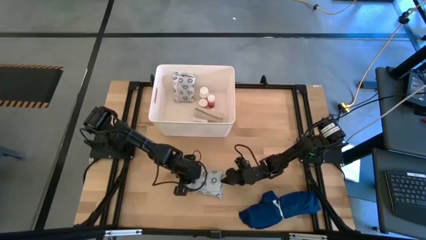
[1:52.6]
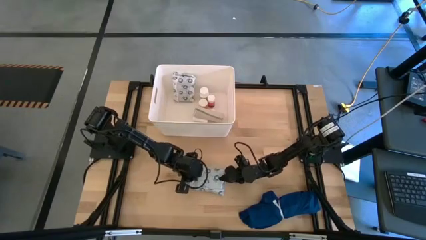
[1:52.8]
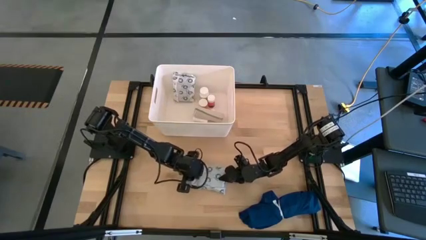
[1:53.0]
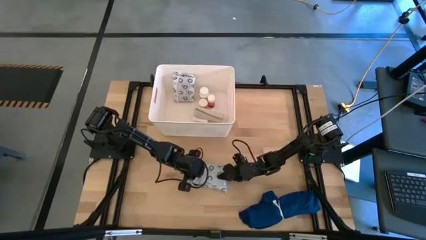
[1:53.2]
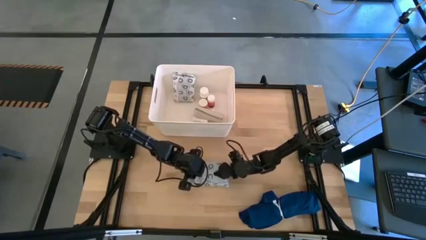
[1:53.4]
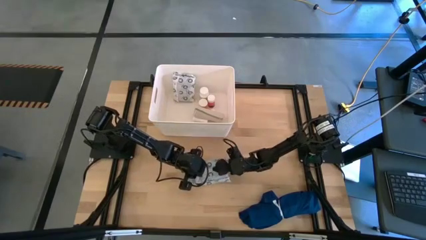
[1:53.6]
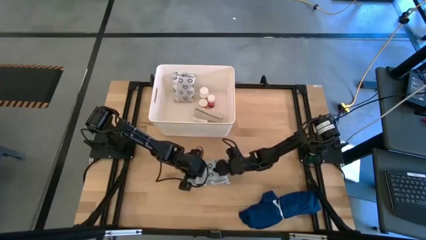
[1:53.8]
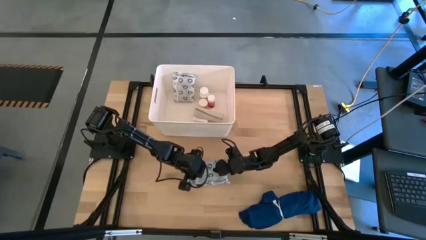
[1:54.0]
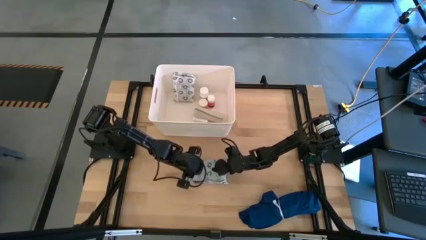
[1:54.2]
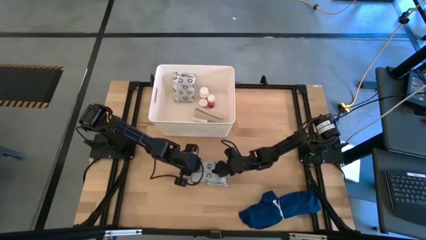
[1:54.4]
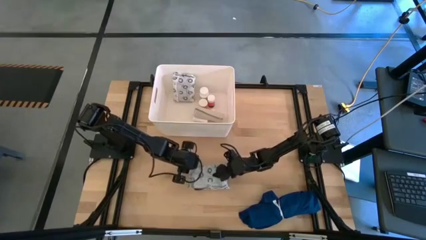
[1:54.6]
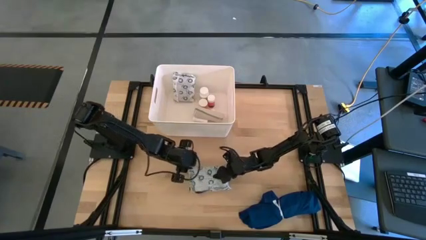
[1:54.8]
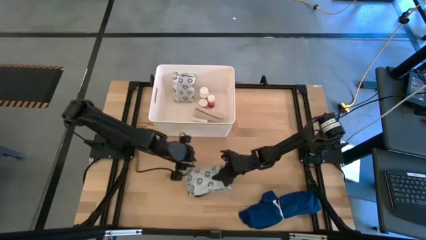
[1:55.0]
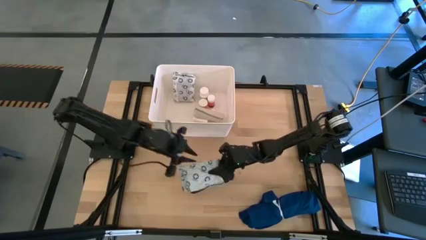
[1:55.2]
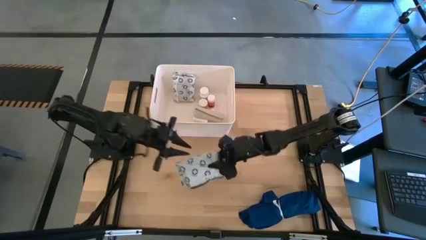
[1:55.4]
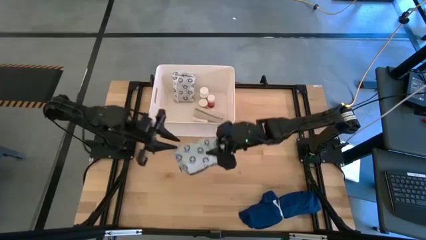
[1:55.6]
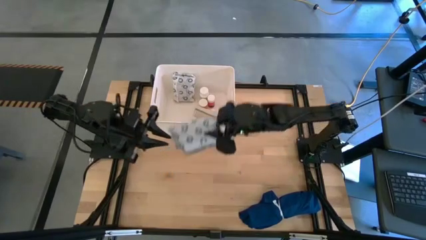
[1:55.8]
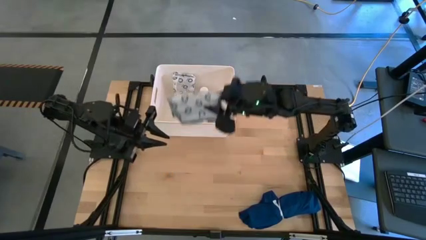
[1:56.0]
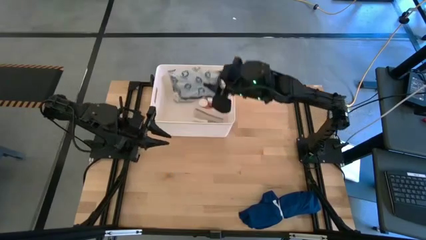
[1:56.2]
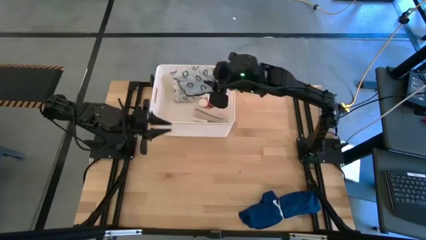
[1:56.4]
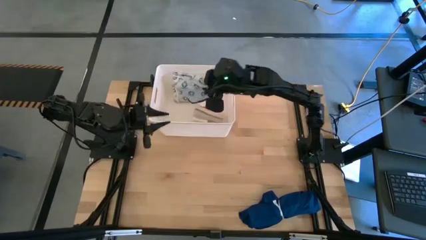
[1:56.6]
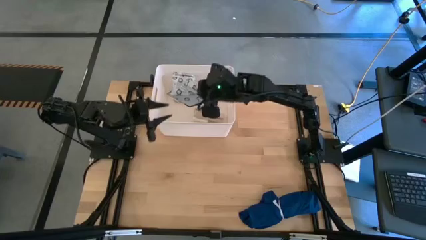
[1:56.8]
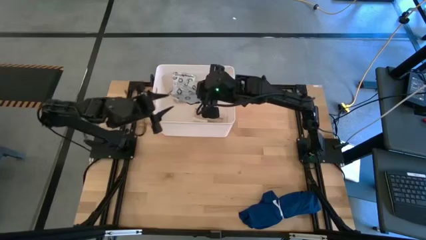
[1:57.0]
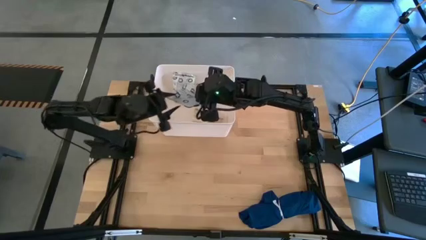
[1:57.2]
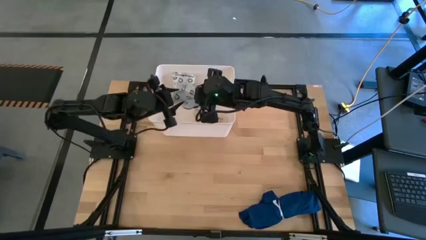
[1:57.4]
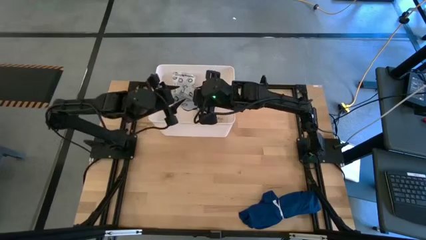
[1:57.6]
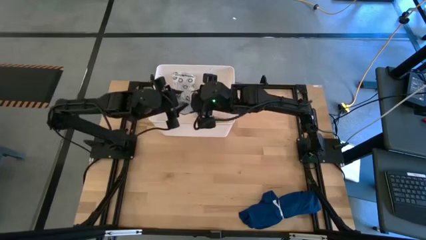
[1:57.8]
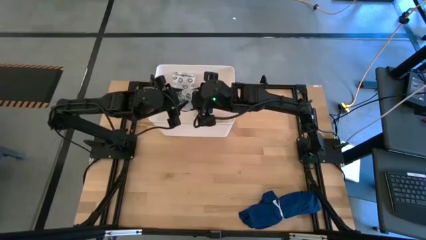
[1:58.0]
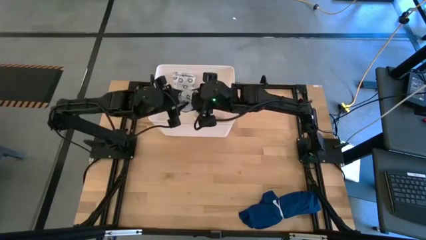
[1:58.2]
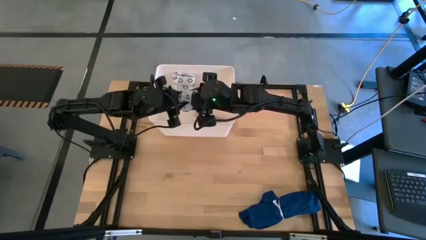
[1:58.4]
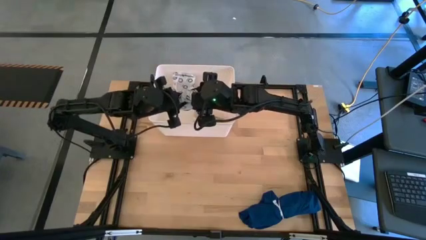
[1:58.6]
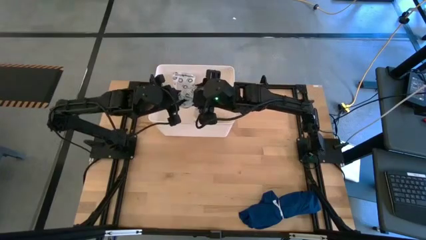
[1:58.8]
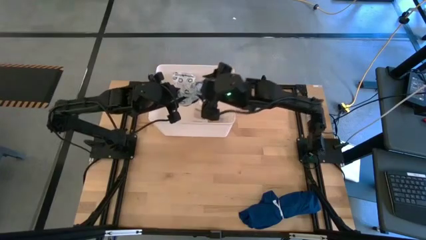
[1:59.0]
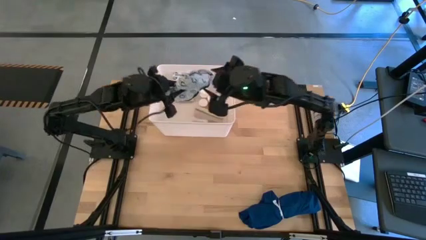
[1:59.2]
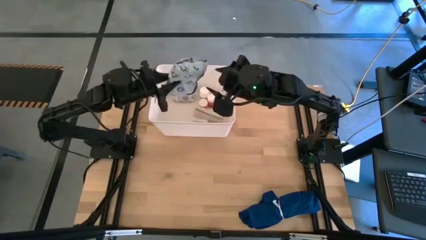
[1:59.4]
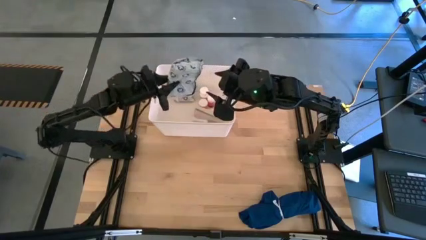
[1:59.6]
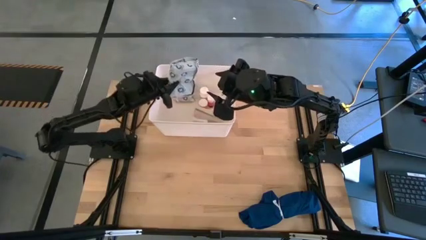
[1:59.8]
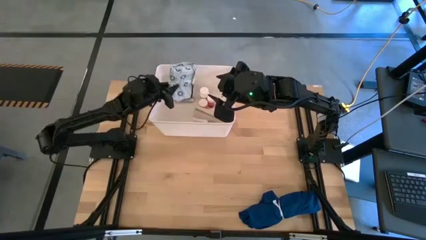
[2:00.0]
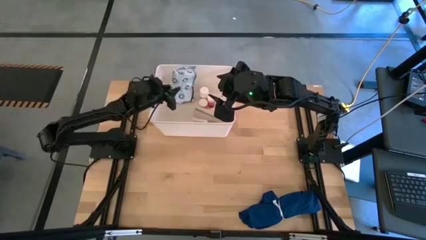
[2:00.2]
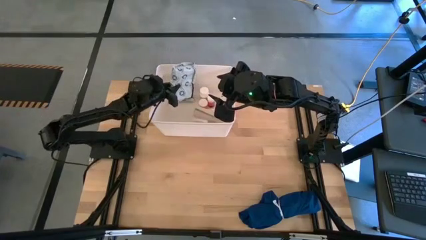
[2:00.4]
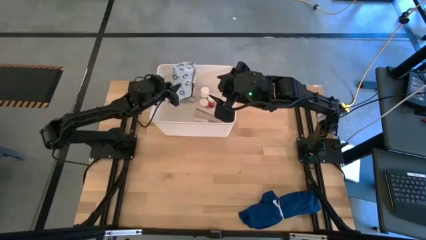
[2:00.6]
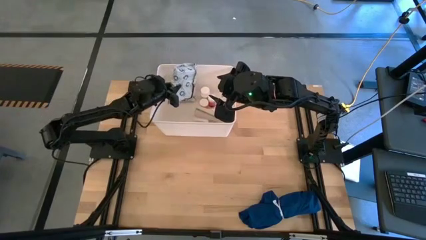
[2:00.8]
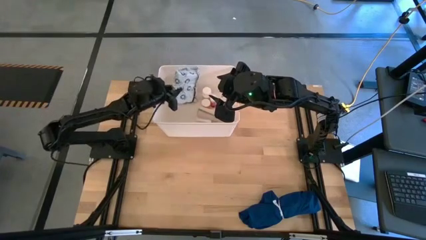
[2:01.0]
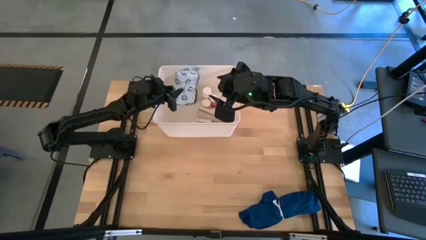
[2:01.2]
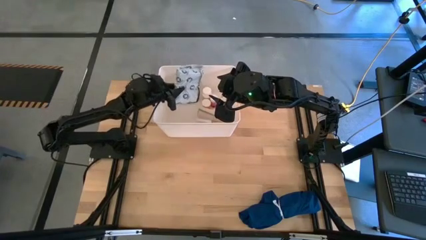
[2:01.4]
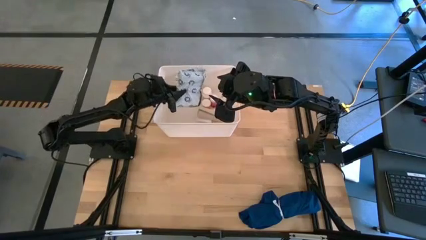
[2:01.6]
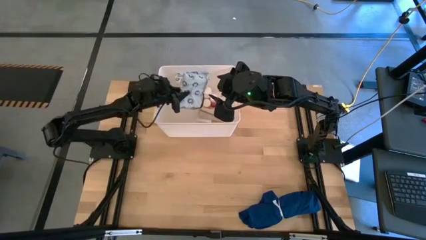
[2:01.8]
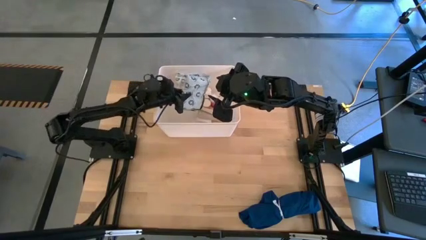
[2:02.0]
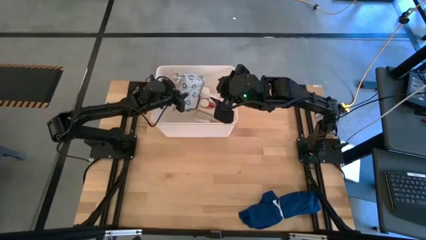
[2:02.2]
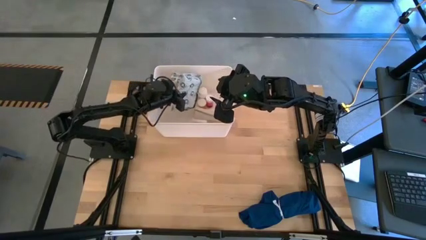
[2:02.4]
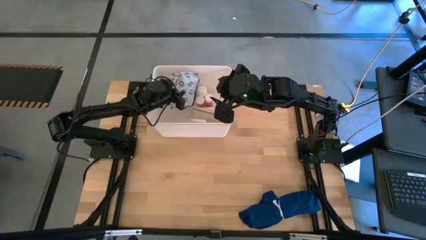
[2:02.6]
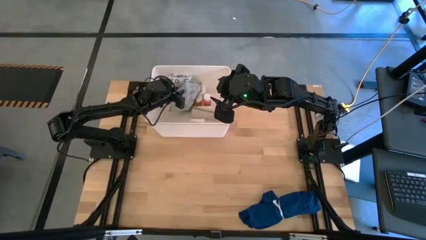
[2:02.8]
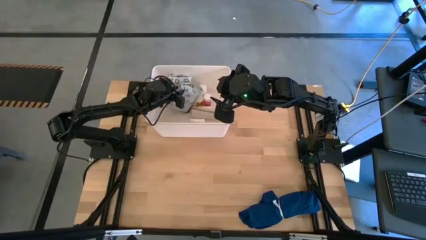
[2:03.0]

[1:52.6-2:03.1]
Task: Pick & place medical supplies in basket/bin
Put the mailer bag into the white bin

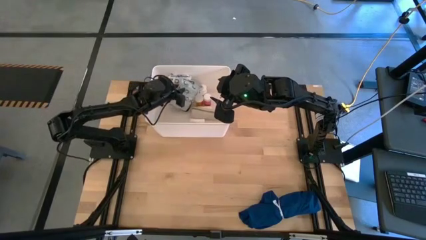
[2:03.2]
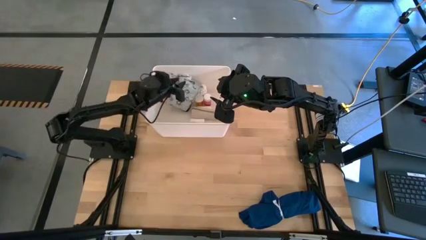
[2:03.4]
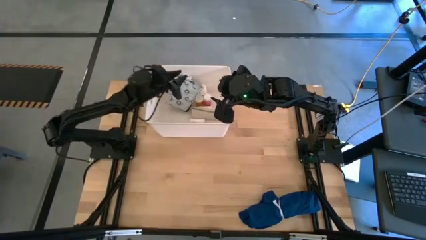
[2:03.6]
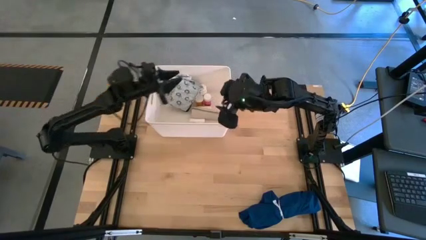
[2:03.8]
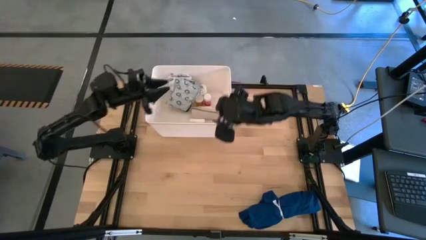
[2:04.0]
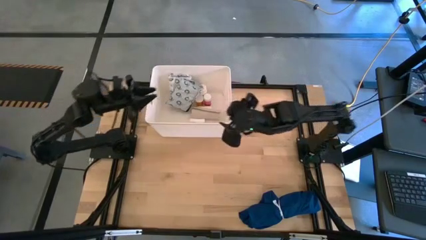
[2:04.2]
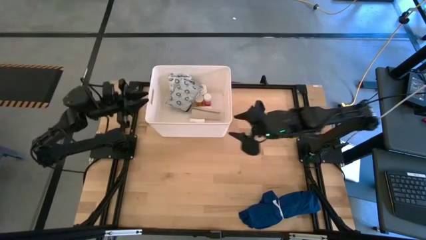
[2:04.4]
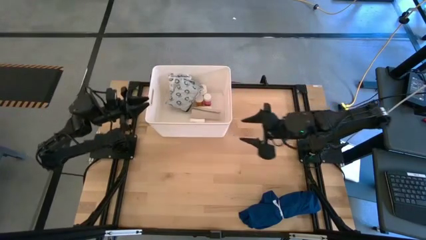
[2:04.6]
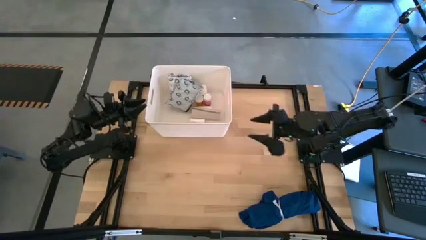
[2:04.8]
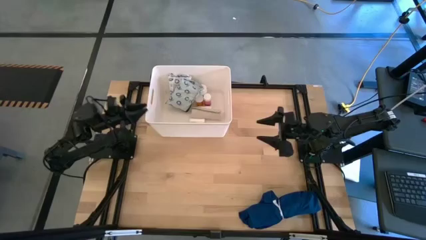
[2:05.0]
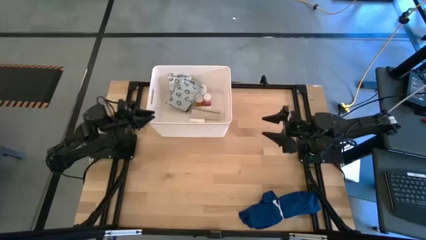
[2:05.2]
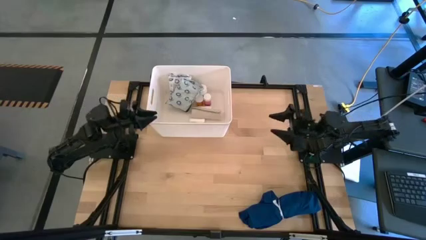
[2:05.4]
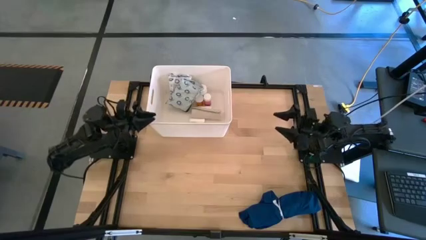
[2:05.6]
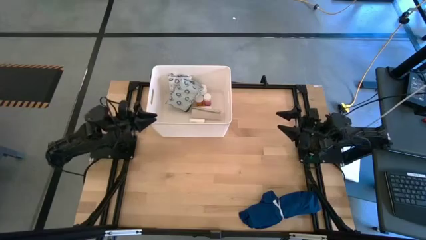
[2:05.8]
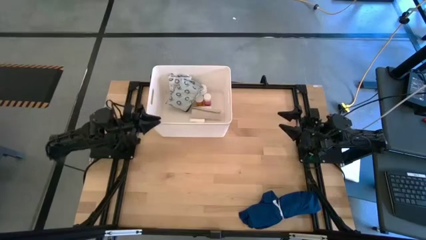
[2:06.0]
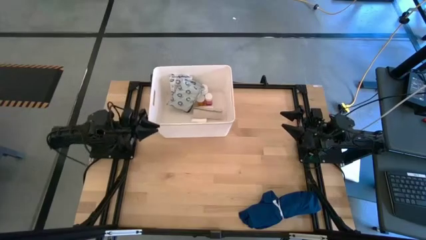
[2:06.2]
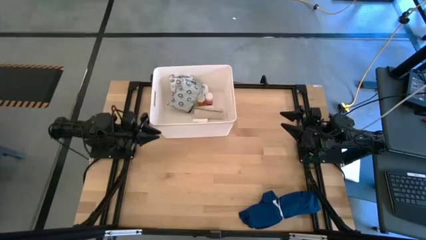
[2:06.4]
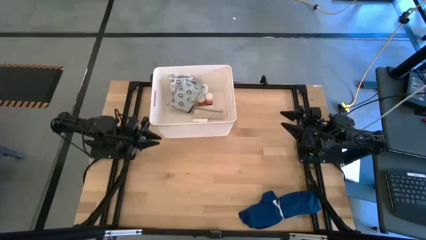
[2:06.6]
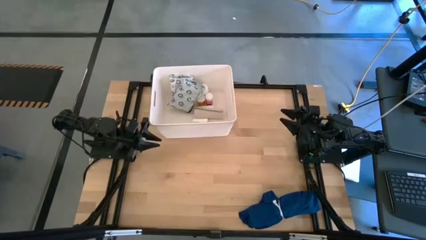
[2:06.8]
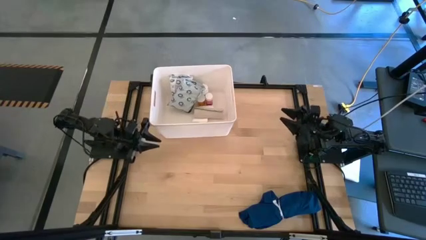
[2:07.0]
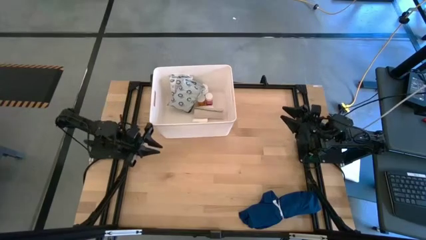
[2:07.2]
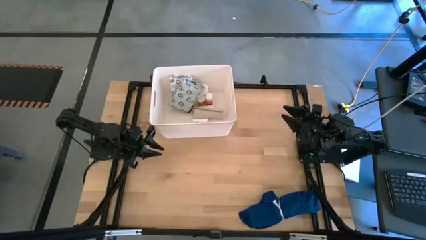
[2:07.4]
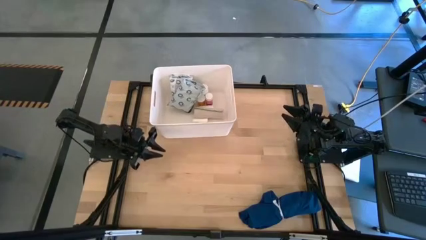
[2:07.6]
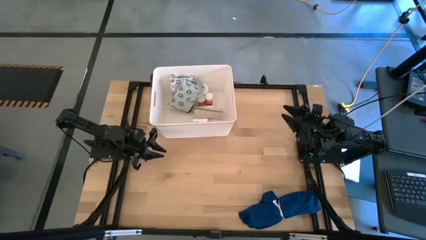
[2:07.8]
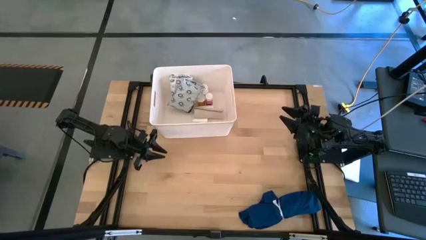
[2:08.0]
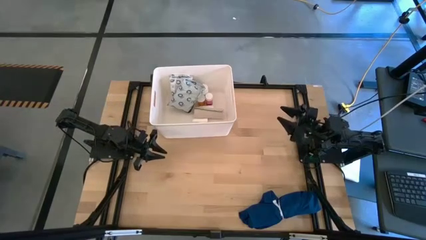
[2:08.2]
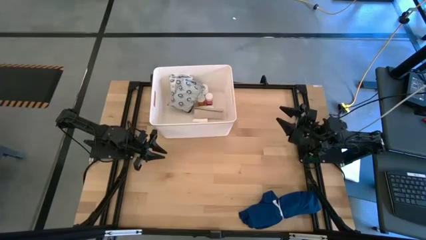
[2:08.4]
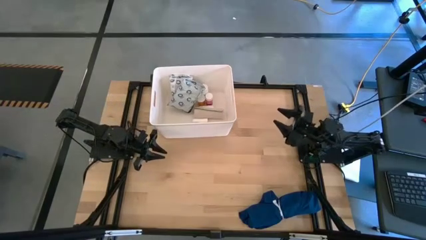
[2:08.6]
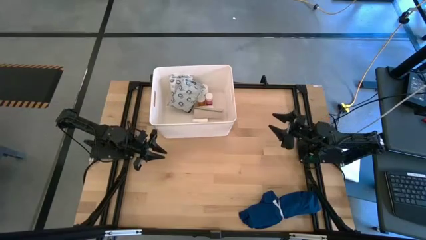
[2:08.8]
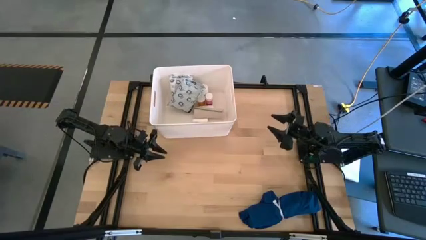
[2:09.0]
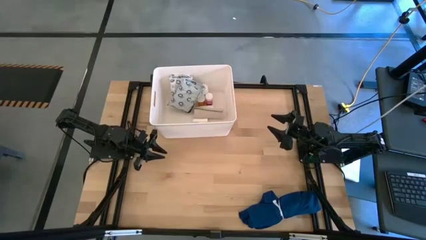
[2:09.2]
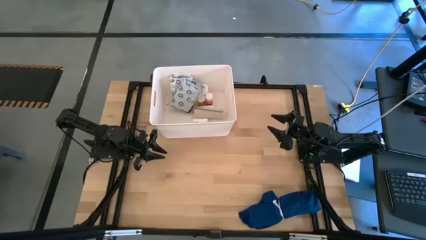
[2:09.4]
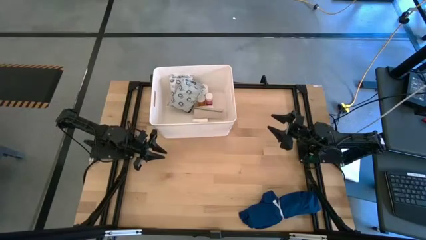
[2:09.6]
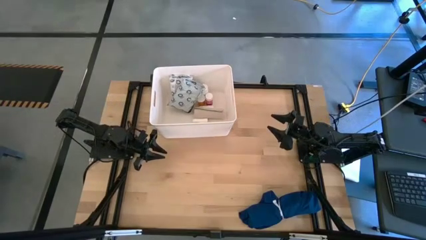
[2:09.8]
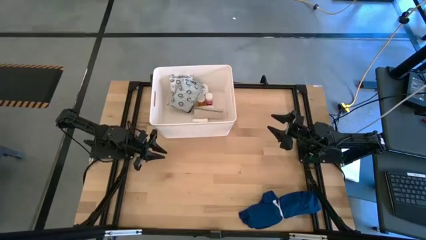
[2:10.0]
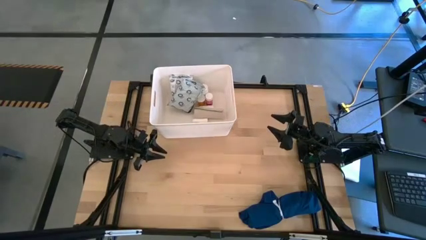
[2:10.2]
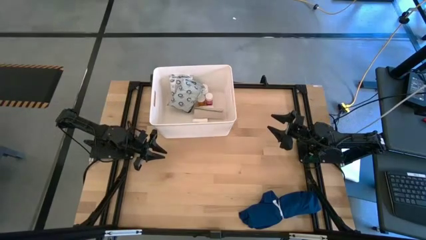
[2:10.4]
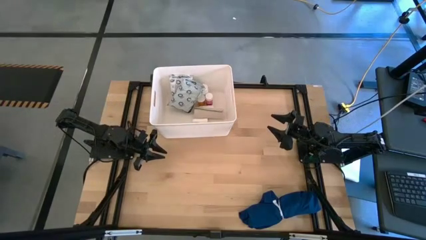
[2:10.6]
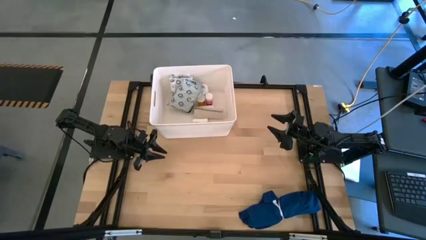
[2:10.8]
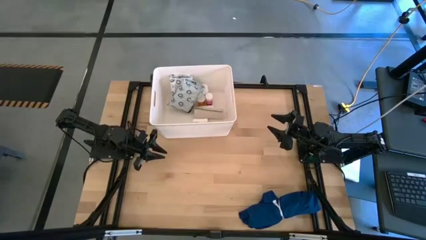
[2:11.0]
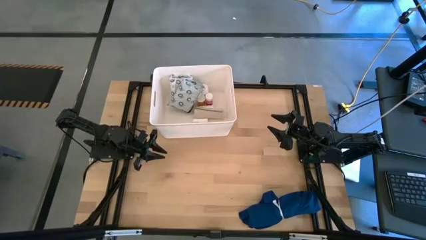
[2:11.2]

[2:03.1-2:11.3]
Return to Home Position
